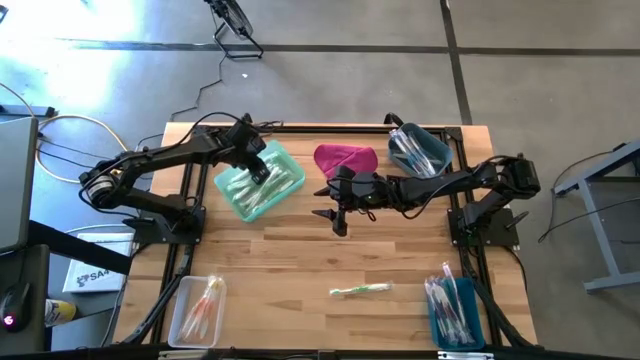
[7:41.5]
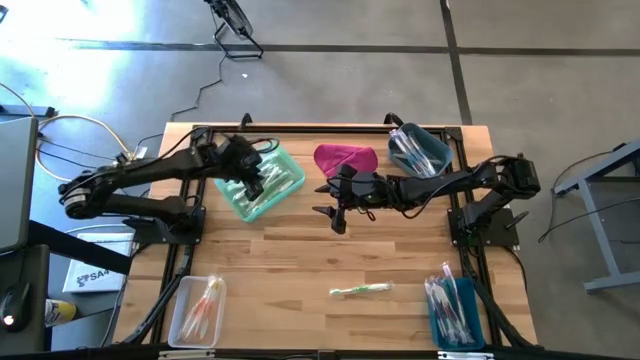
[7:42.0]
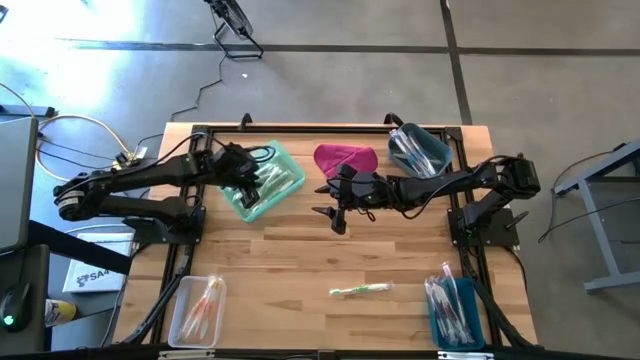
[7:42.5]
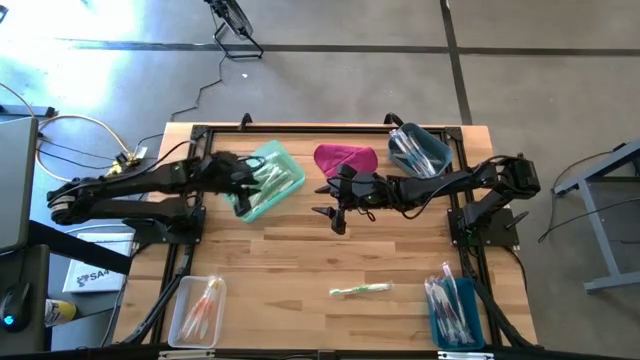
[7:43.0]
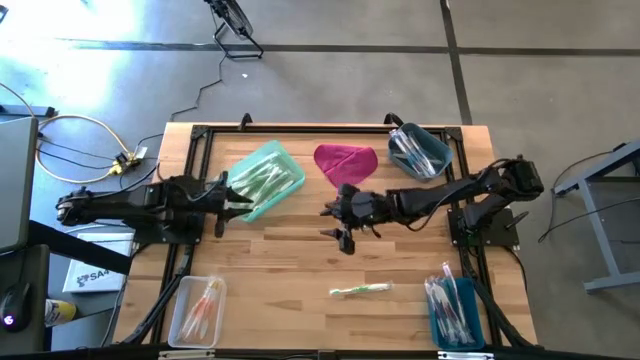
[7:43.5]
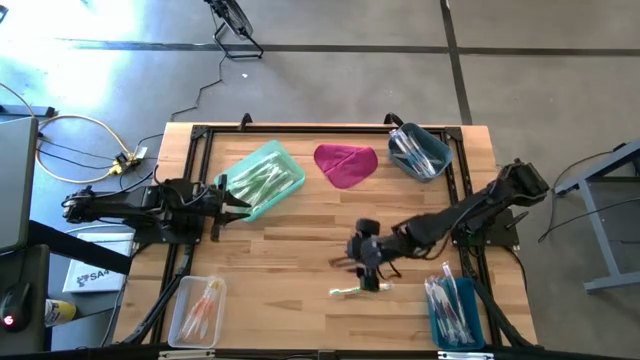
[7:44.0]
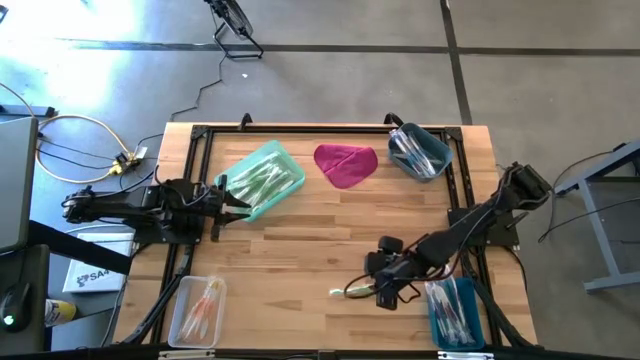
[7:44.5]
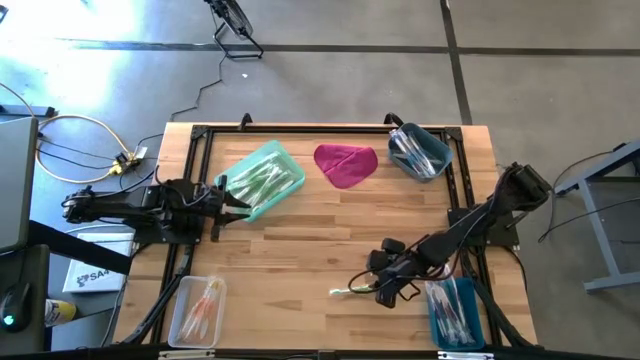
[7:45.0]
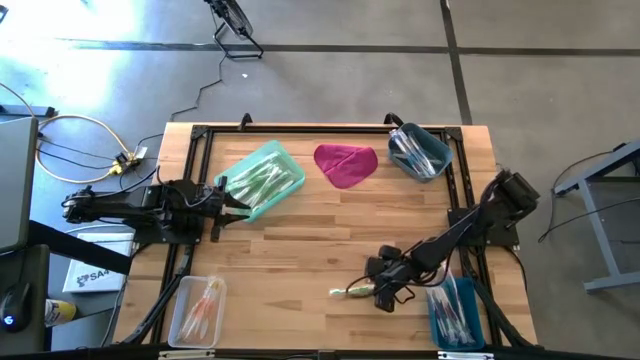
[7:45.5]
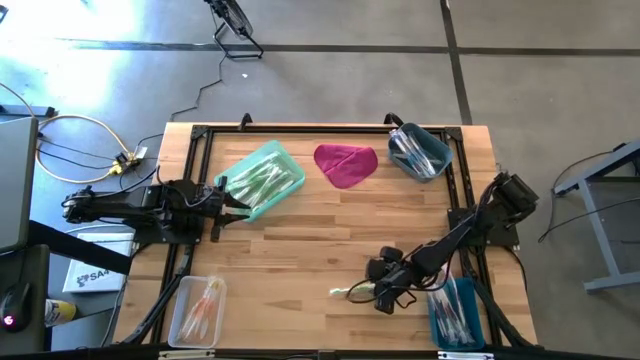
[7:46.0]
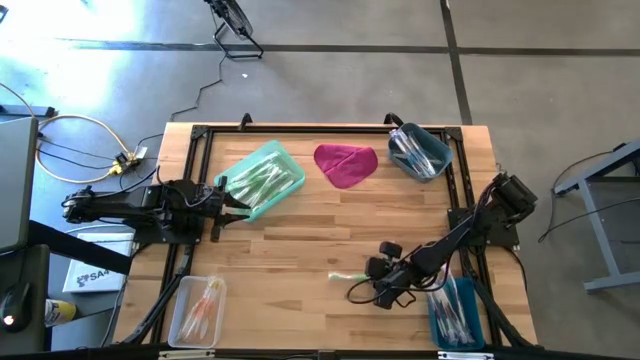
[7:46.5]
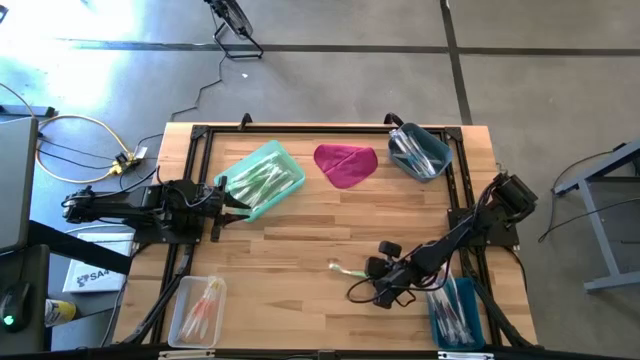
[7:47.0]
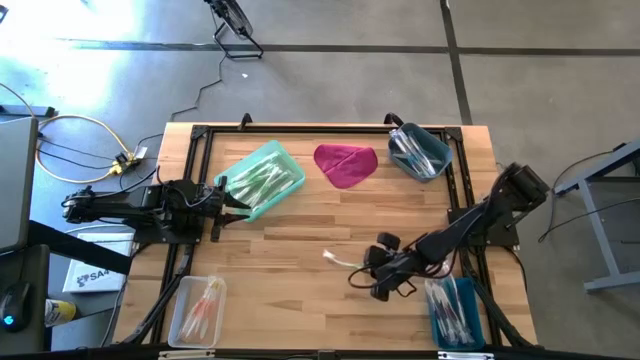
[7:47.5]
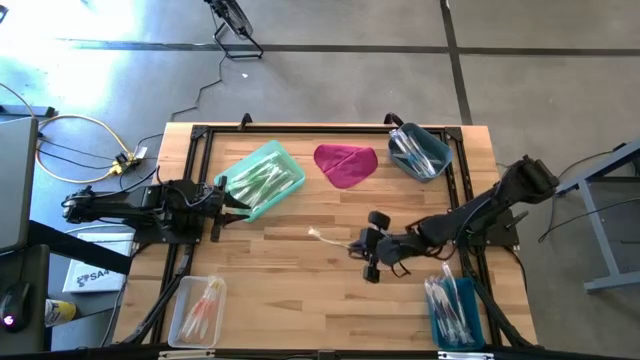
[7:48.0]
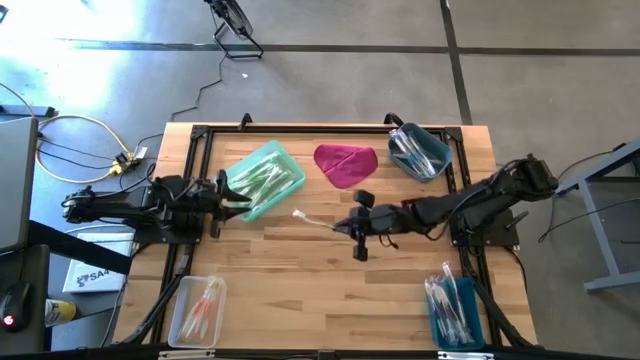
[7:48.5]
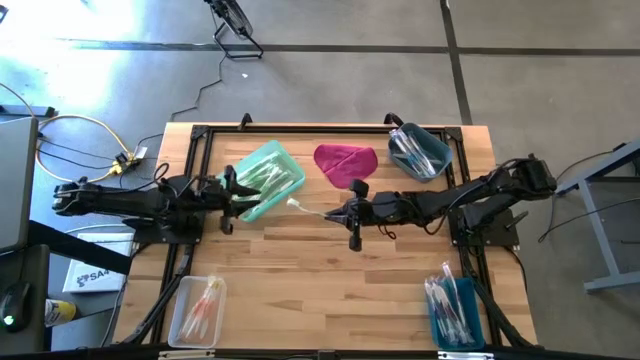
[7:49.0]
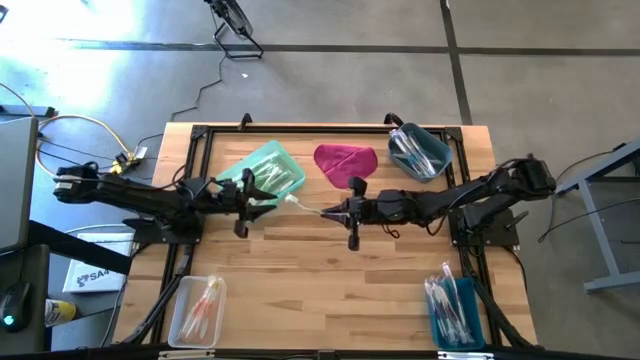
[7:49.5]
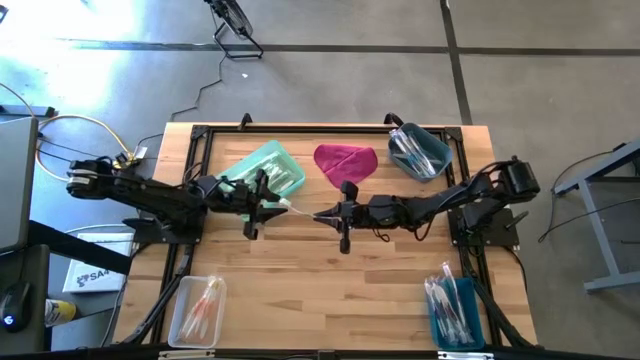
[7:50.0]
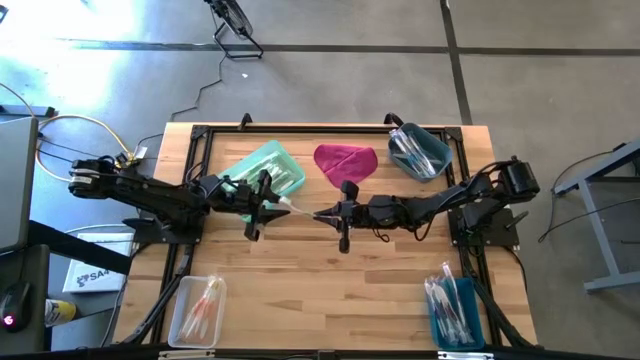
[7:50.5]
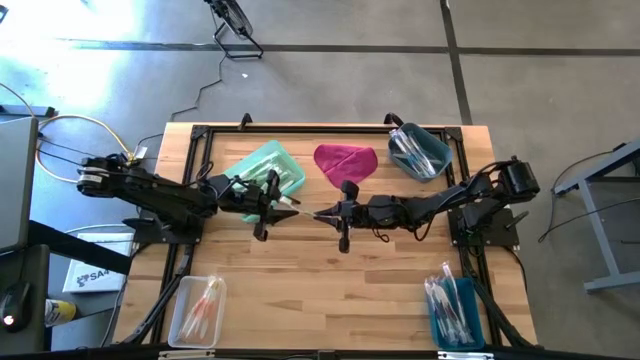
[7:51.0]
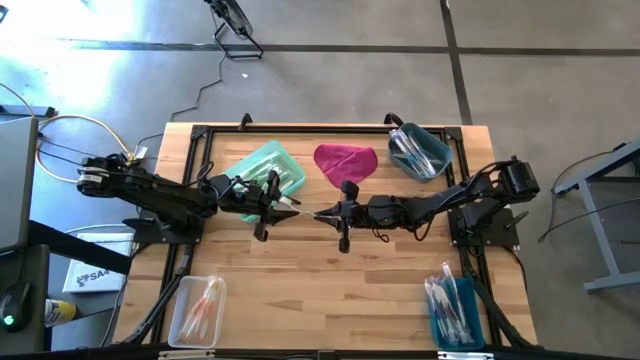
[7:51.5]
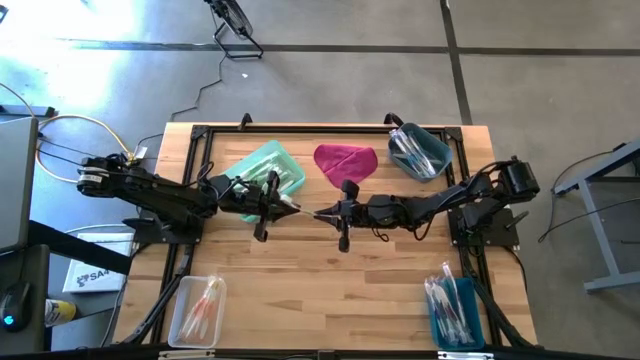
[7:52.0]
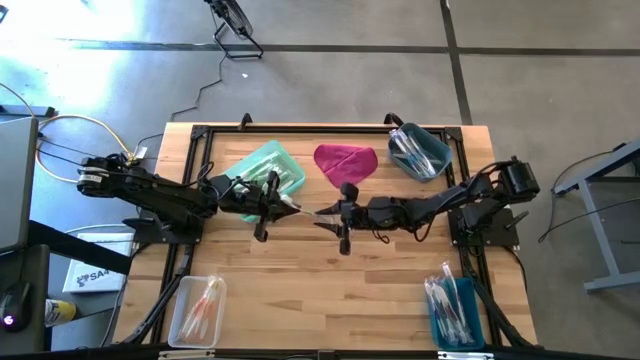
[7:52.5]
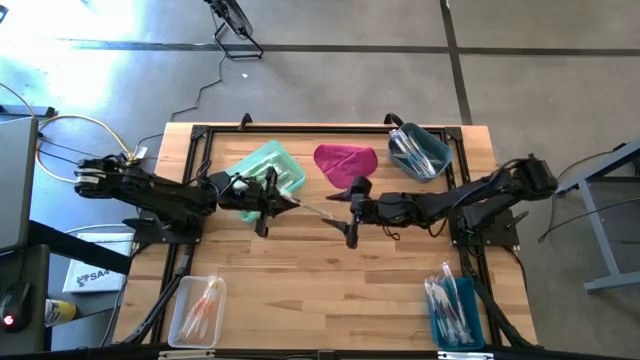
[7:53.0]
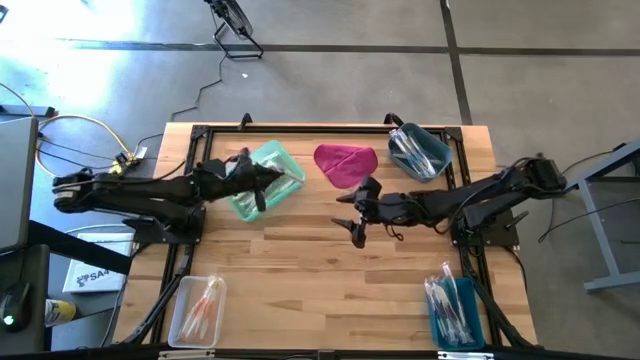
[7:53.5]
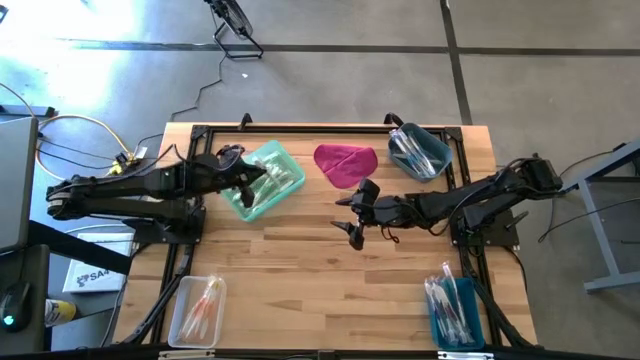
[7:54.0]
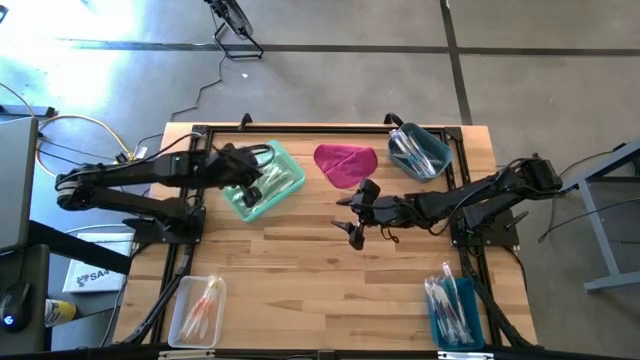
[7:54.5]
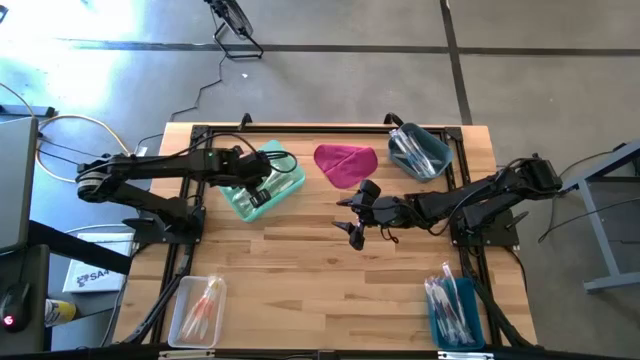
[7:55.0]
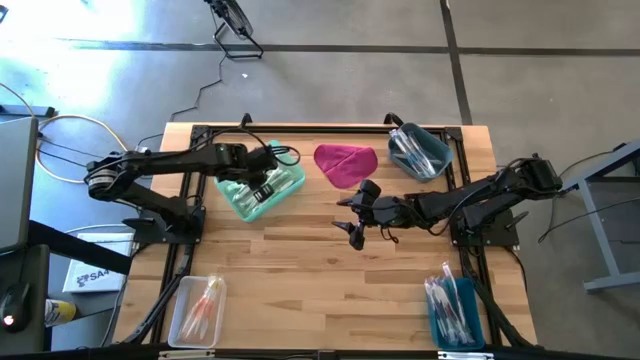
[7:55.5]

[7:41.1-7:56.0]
Task: Pick & Place Toothbrushes
Put the green toothbrush to the green bin

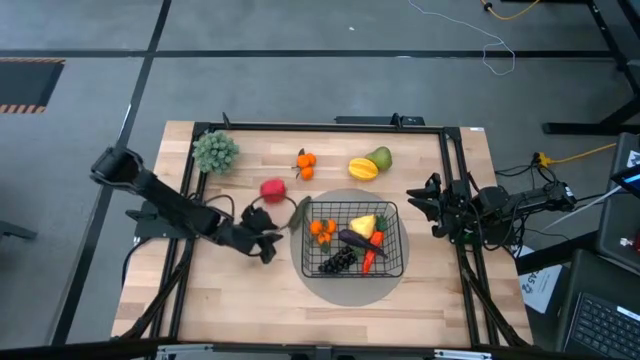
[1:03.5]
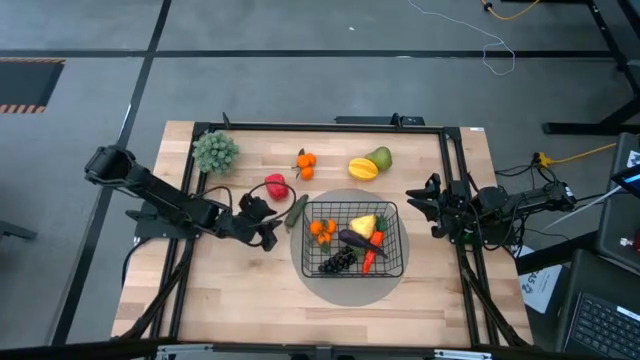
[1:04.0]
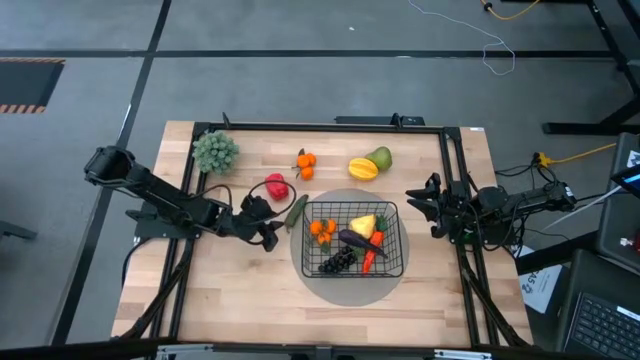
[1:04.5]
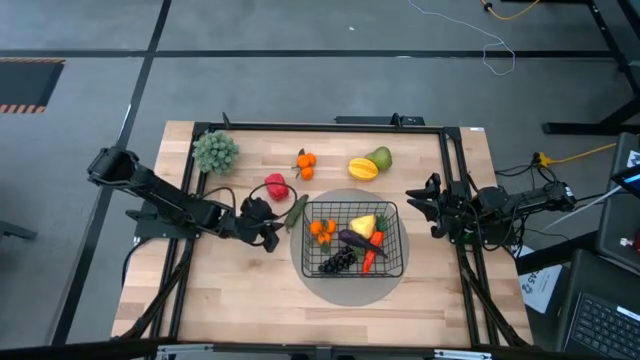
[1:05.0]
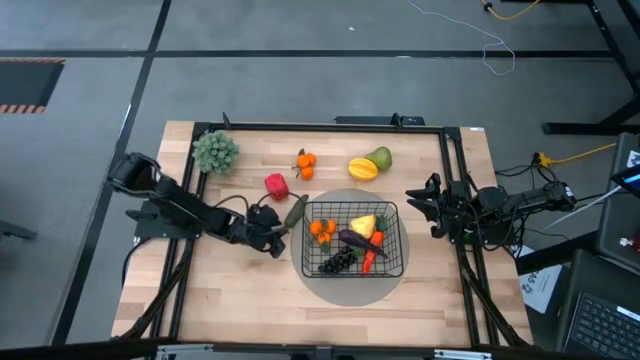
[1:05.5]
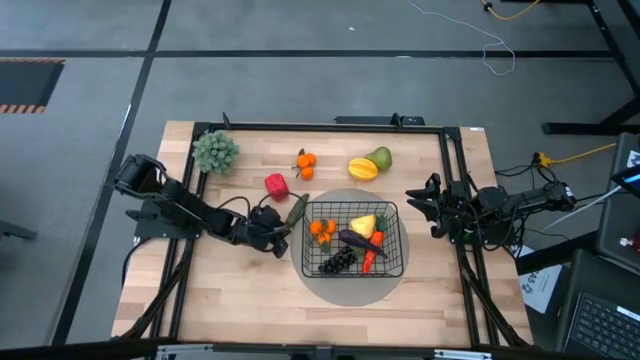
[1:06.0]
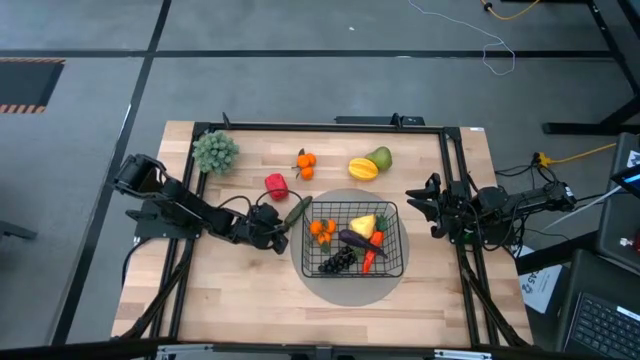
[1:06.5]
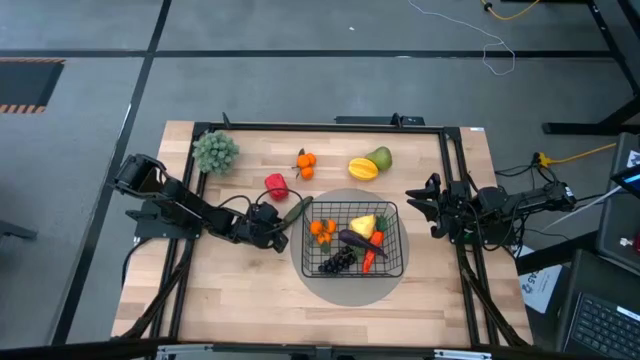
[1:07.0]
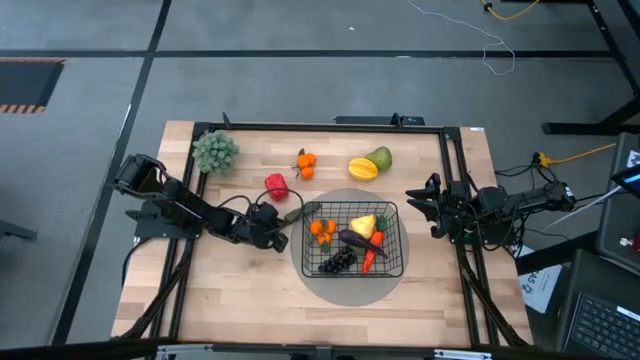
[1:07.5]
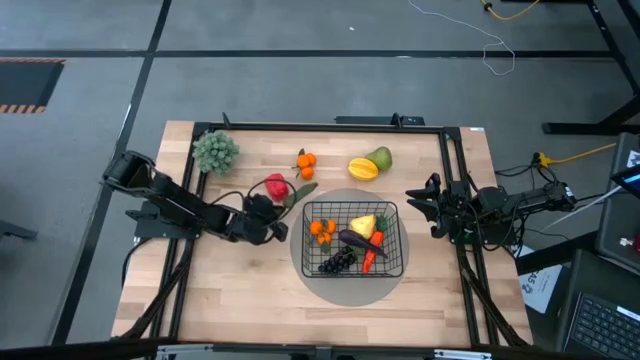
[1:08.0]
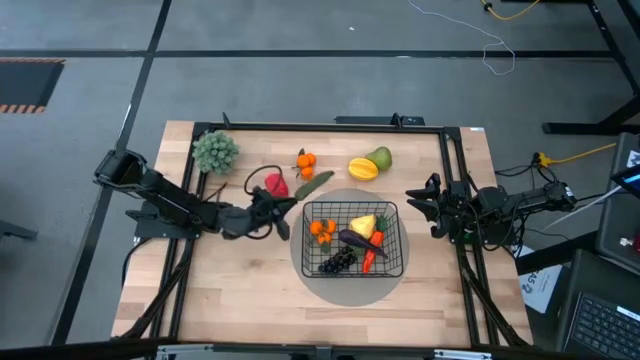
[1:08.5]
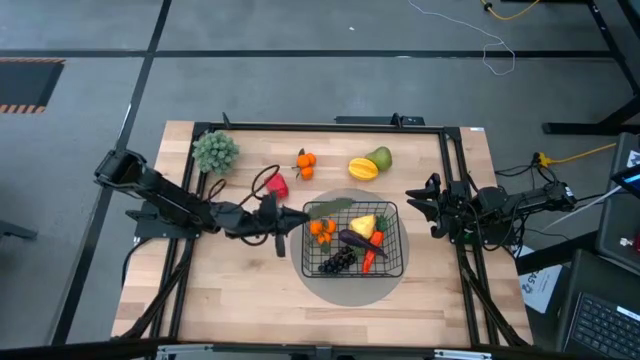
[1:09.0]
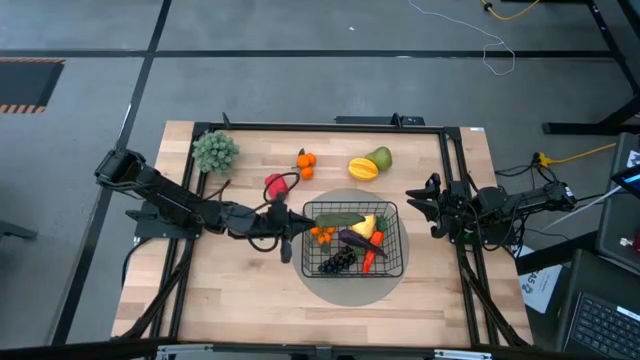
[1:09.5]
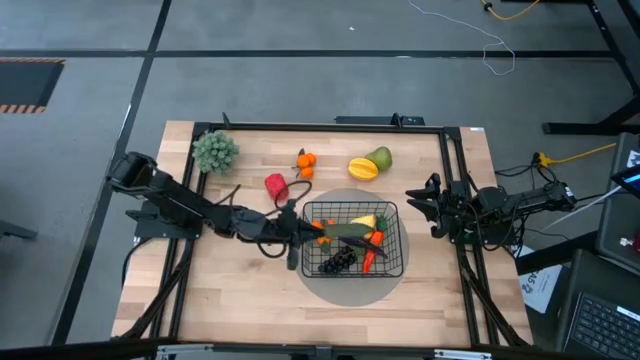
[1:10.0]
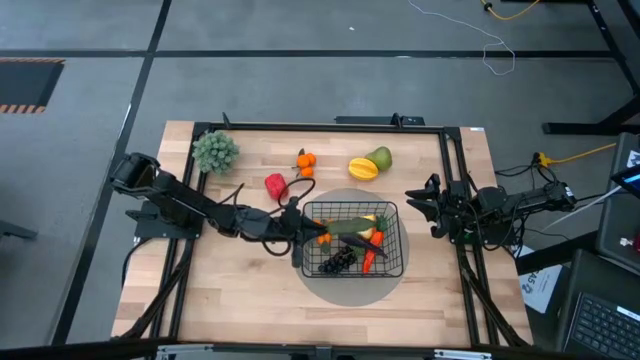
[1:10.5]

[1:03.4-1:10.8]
Task: Build produce basket
Put the green chili pepper into the black wire basket
